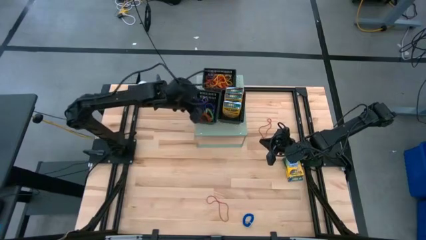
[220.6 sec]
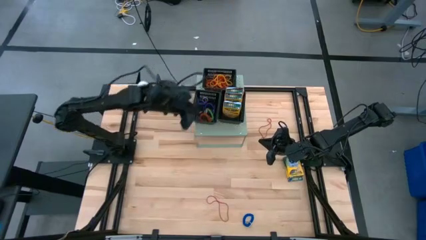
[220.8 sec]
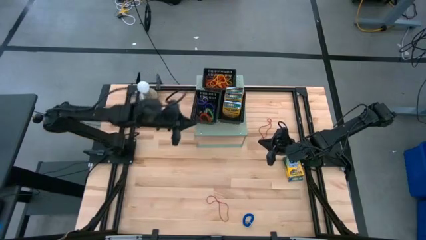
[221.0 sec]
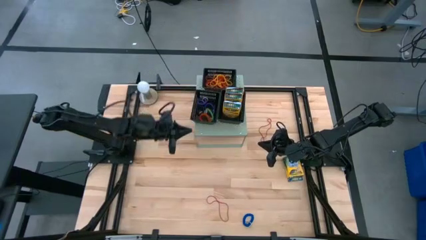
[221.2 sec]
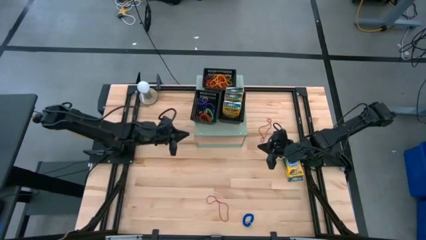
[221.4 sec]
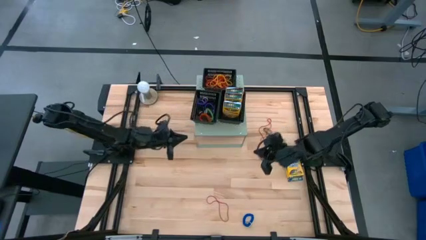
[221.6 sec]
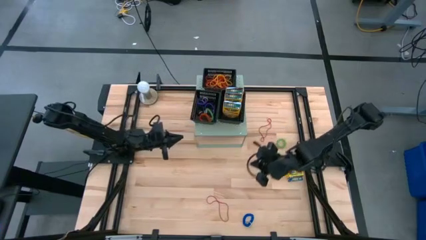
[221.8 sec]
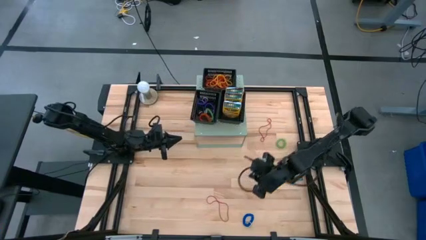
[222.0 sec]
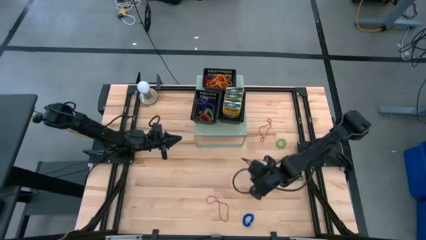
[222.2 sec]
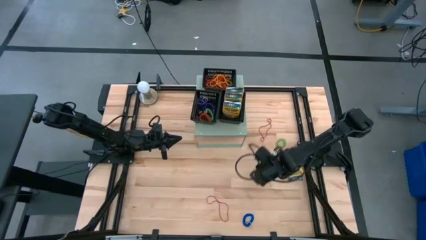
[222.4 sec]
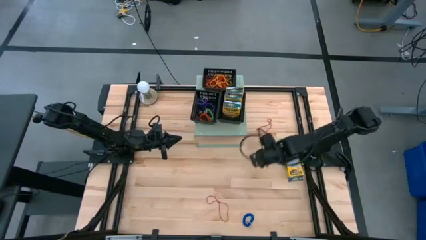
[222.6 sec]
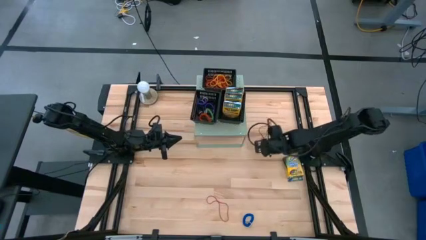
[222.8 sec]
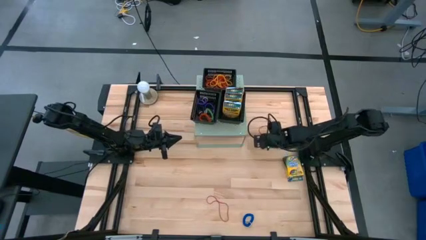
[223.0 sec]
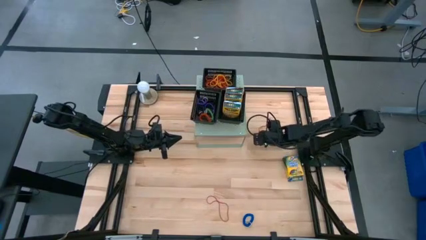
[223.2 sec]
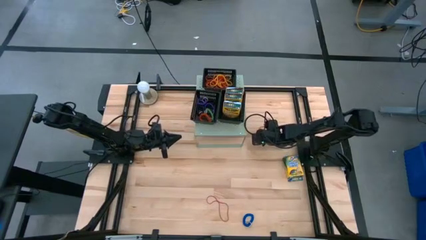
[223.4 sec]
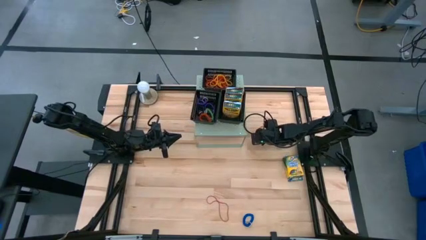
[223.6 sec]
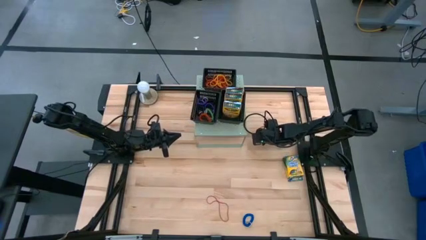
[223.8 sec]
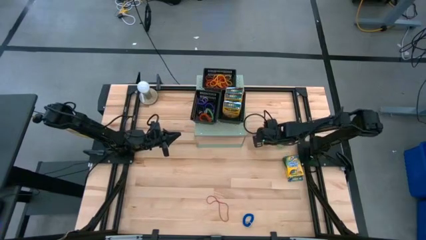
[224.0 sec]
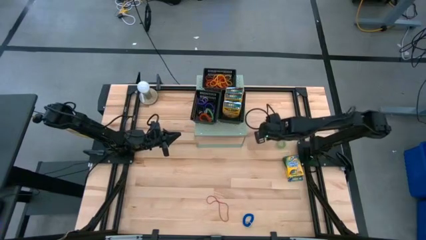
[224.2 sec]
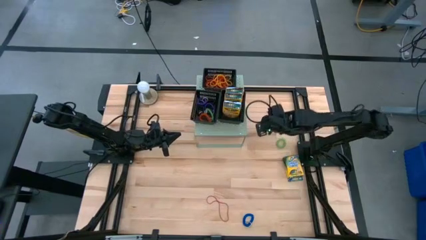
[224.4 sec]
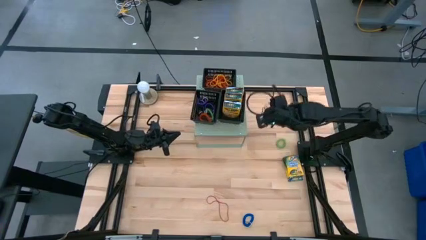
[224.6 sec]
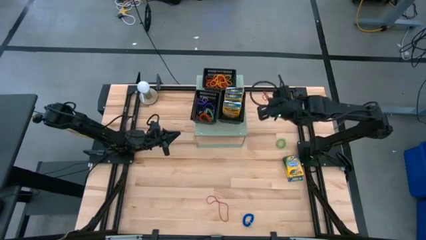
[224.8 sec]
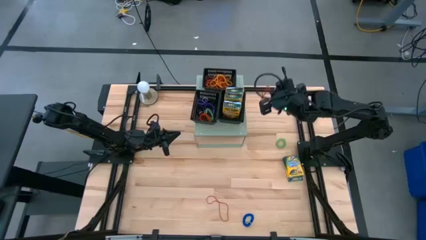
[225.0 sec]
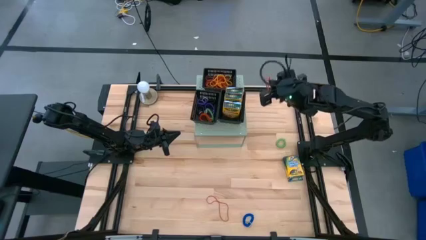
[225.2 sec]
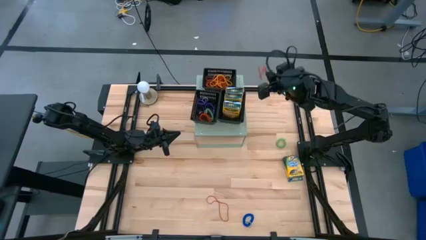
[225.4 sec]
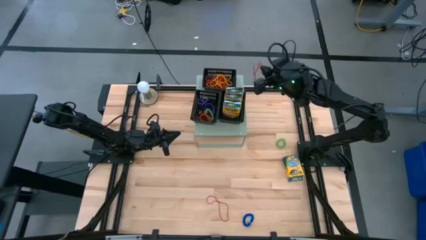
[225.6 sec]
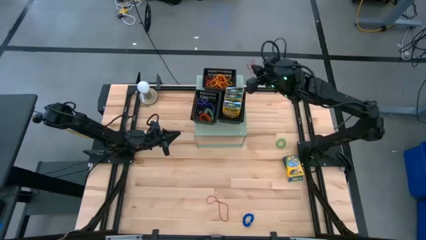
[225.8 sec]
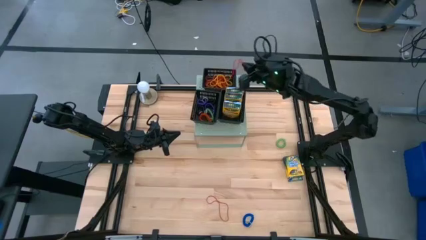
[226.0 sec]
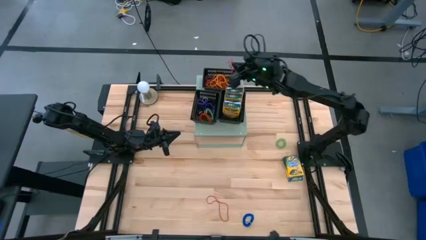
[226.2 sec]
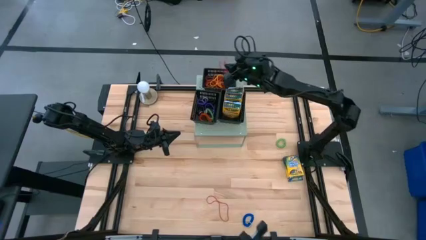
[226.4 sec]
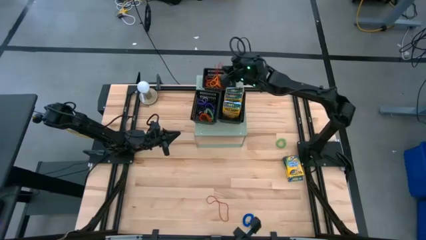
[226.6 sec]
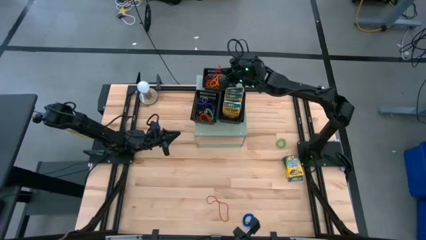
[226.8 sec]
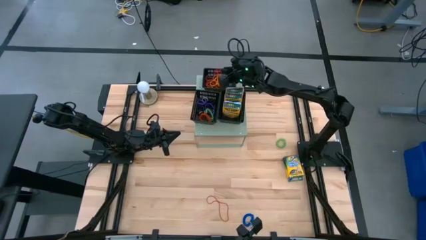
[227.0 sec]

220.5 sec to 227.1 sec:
Task: Pick & Place Office Desk Supplies
Put the red rubber band into the top black bin

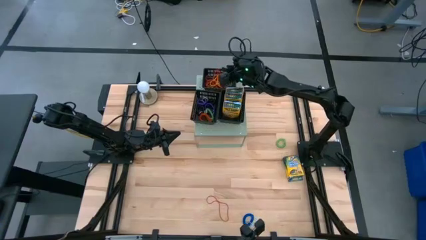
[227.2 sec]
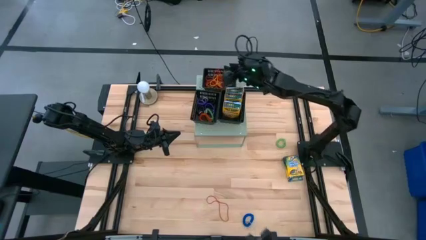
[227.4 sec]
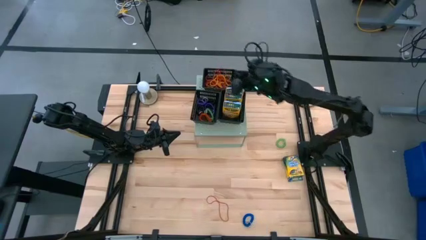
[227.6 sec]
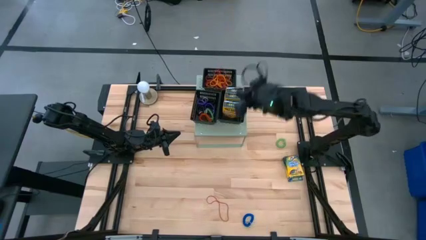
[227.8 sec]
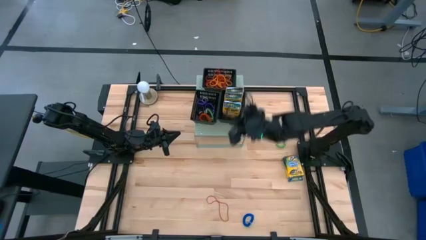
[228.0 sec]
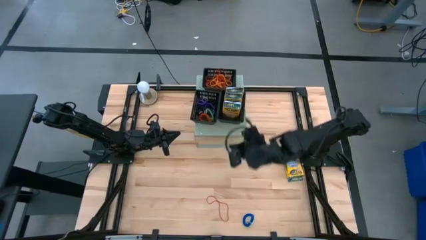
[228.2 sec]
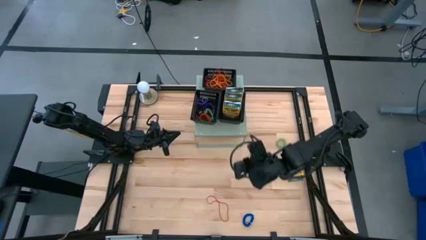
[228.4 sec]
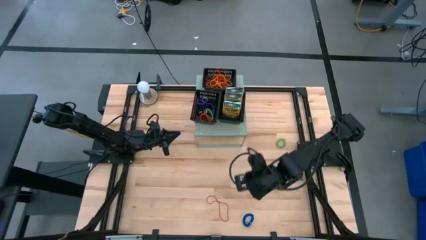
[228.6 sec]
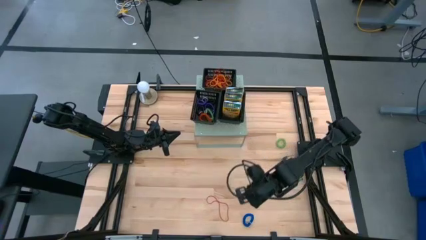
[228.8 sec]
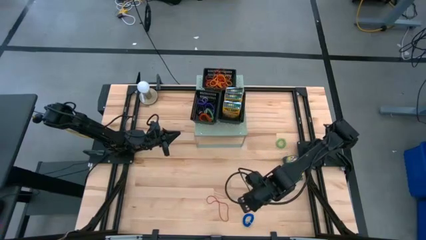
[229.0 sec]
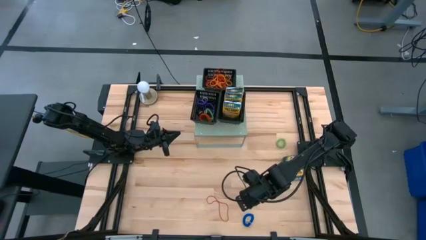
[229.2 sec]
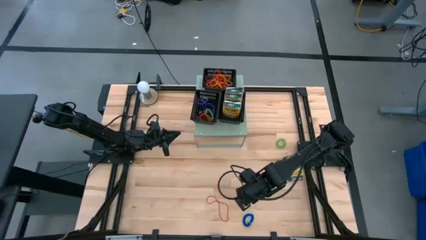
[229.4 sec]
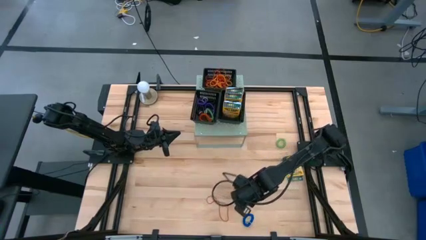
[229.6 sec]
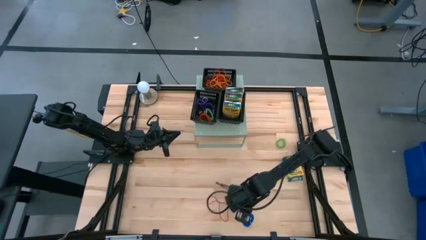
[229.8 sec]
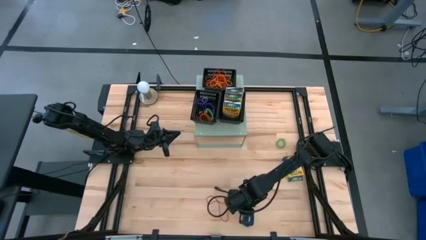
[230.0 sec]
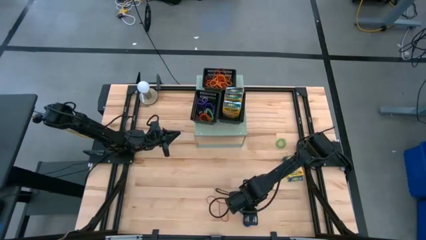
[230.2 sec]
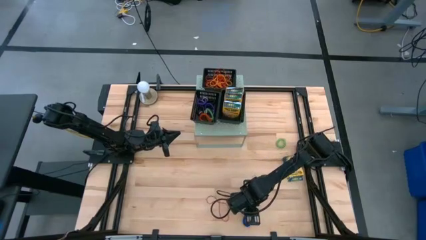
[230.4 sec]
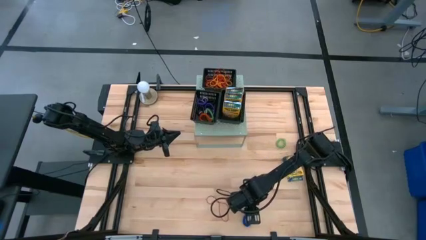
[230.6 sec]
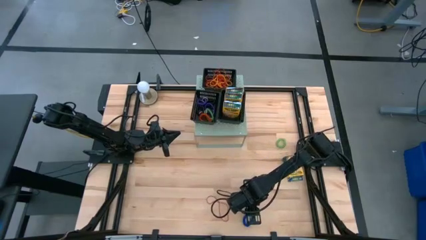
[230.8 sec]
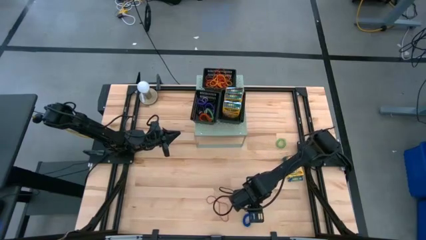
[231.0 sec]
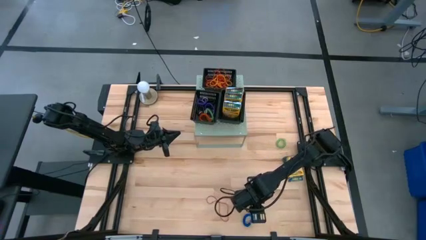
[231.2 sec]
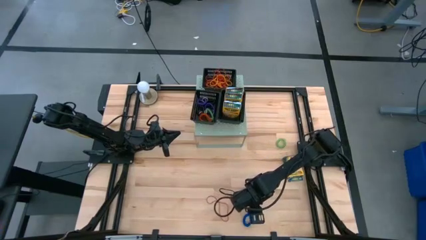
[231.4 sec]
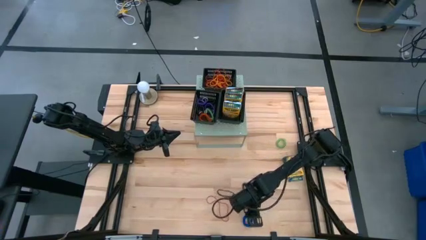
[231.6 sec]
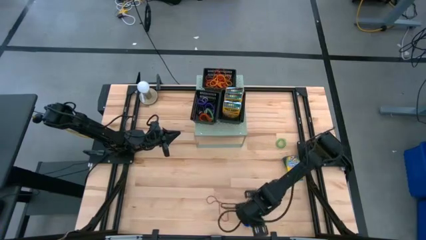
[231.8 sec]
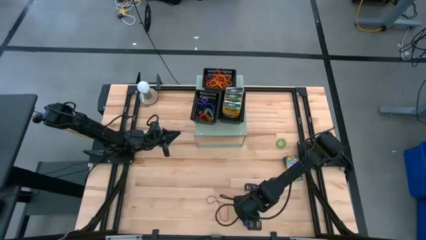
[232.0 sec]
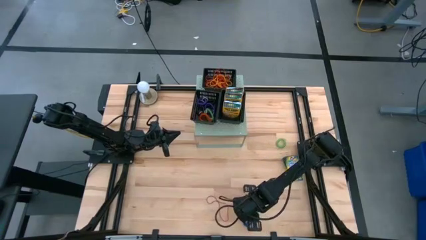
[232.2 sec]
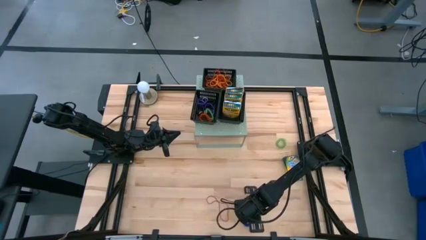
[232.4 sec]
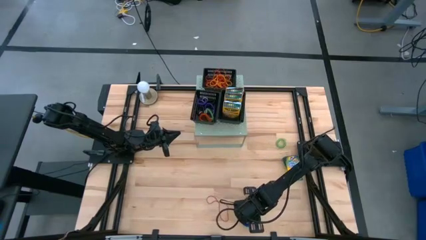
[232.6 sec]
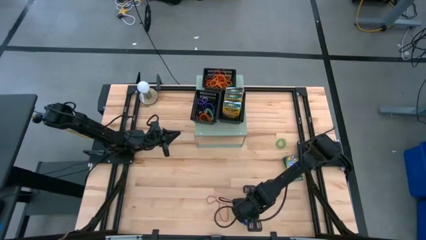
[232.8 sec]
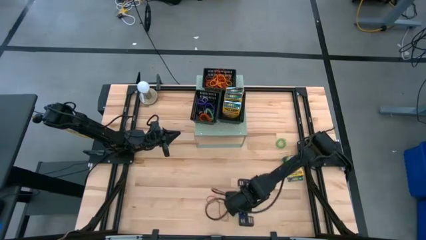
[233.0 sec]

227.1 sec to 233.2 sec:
Put the blue spiral keychain into the bottom left black bin

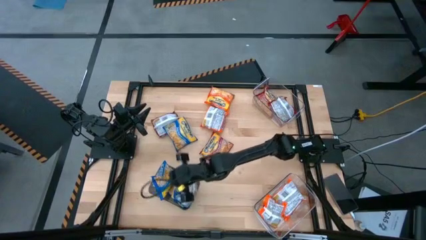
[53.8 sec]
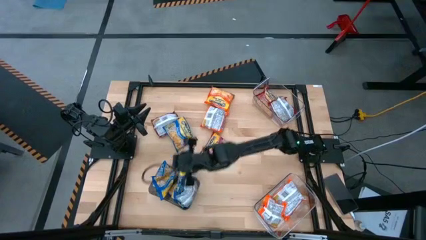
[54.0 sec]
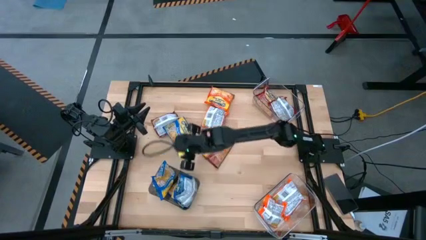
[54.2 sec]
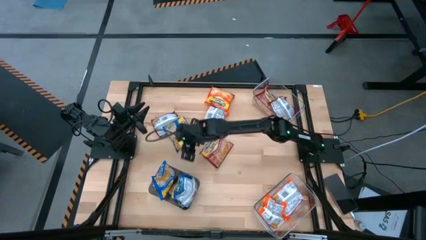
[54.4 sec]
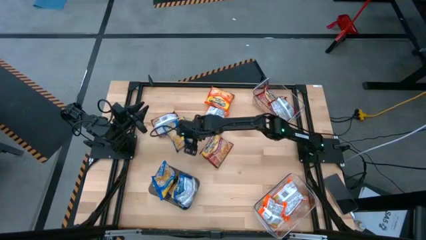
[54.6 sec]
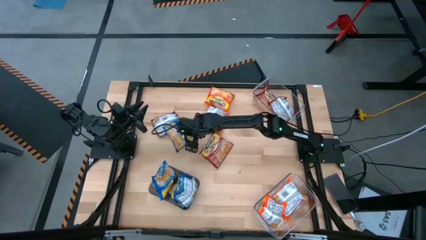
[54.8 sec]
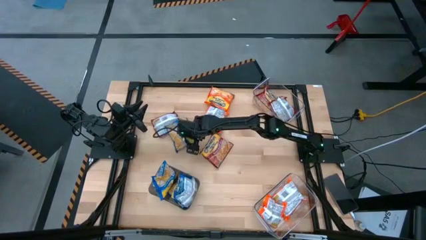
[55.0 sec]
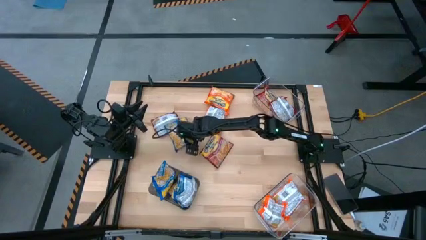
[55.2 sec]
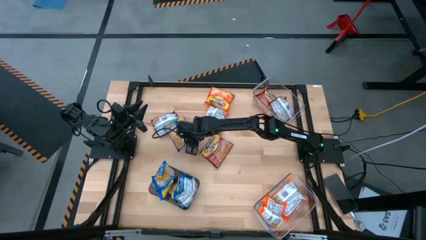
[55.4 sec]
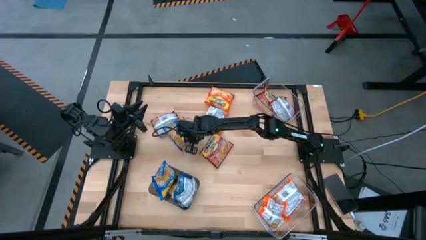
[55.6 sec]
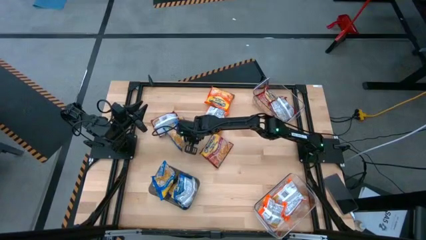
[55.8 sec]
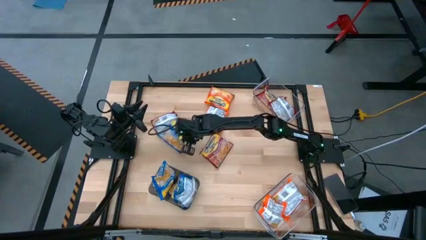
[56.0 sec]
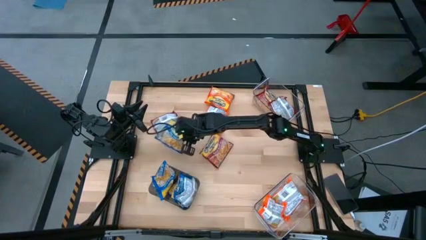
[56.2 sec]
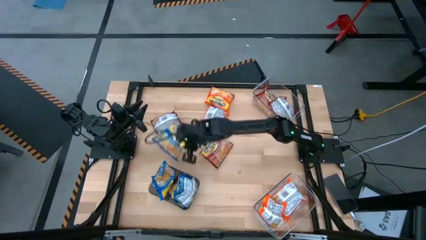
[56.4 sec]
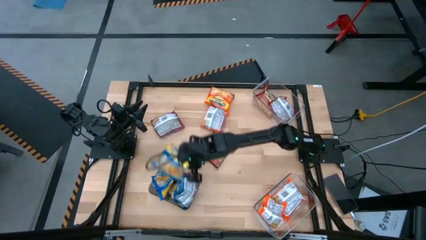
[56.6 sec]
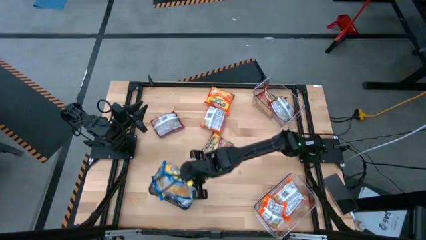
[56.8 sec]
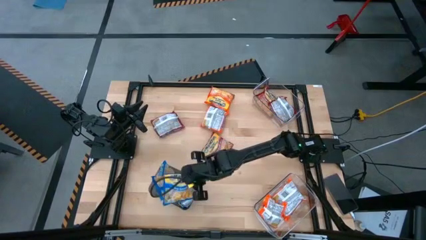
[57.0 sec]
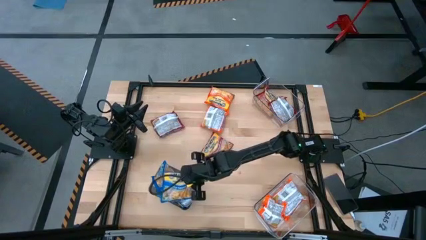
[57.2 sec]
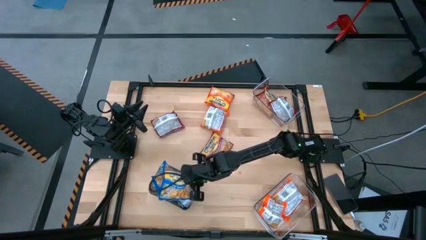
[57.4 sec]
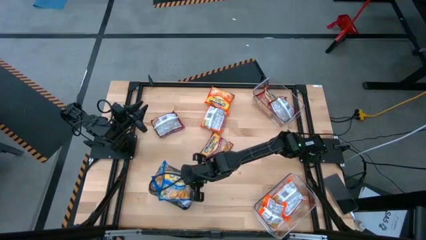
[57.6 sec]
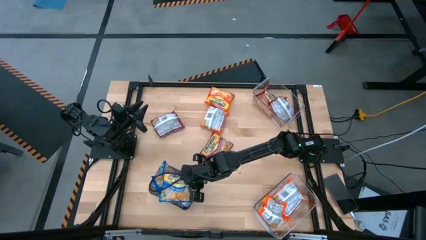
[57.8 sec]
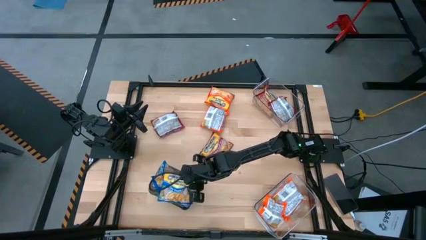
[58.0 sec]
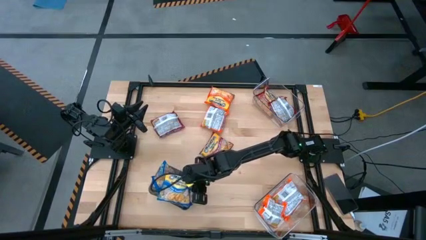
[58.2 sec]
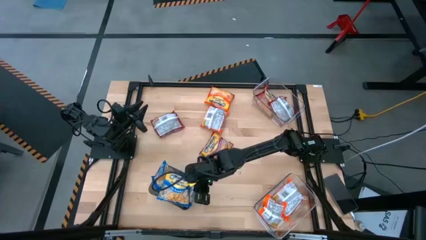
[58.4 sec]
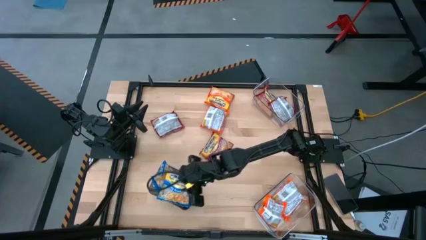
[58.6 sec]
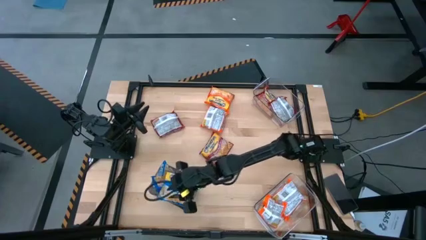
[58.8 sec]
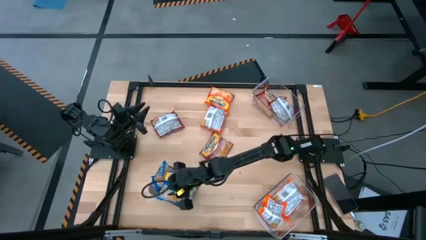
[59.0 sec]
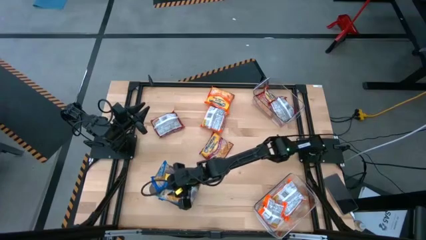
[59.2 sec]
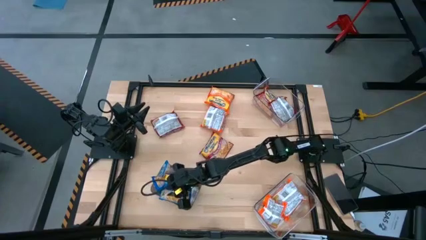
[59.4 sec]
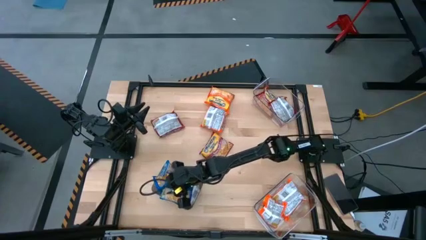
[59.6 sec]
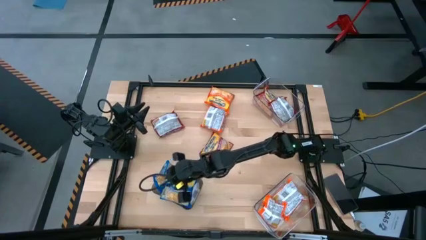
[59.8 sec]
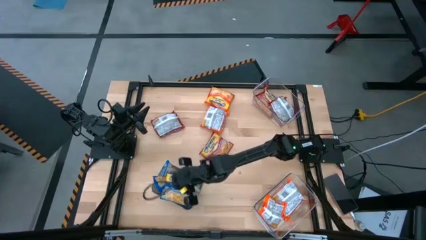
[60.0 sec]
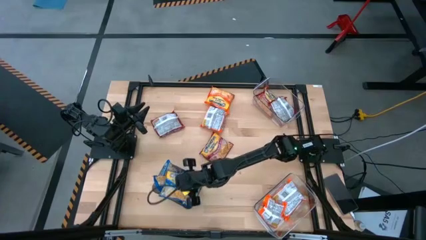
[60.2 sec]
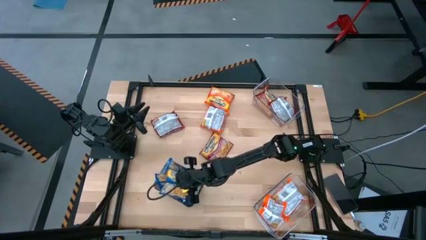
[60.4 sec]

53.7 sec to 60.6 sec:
Task: Sort Maruchan noodles
Put the blue noodle pack into the black bin
